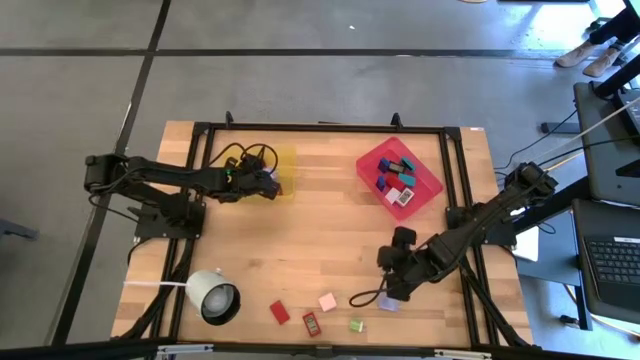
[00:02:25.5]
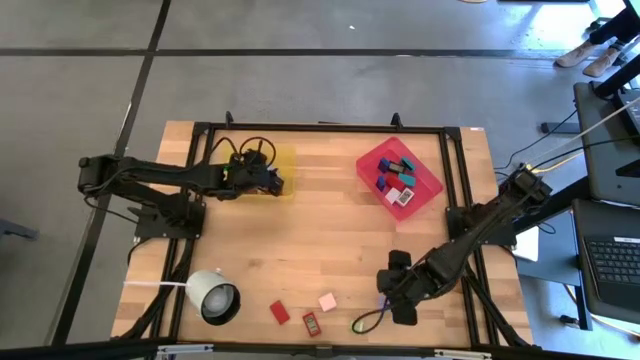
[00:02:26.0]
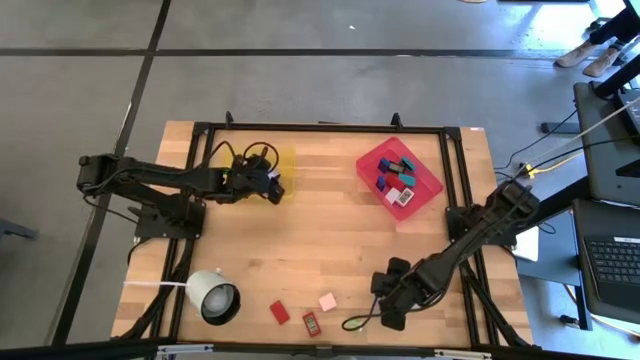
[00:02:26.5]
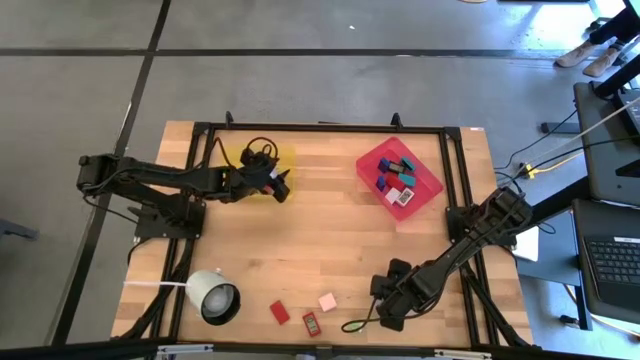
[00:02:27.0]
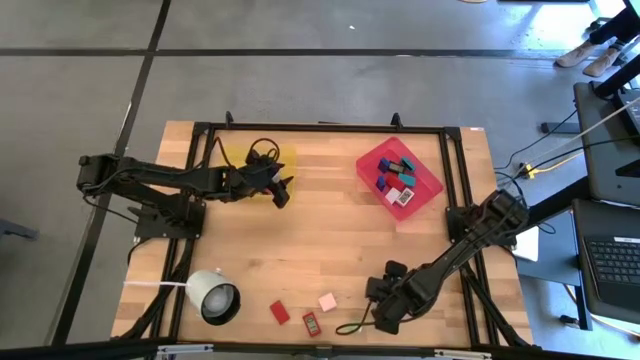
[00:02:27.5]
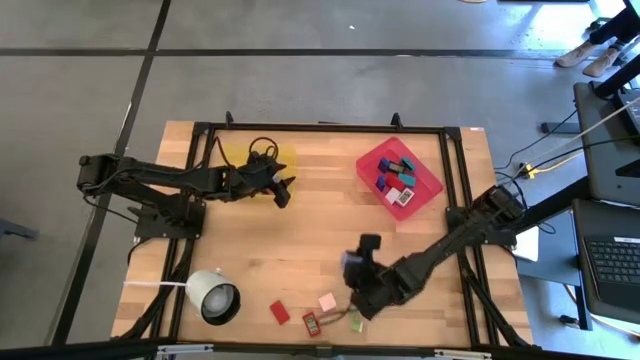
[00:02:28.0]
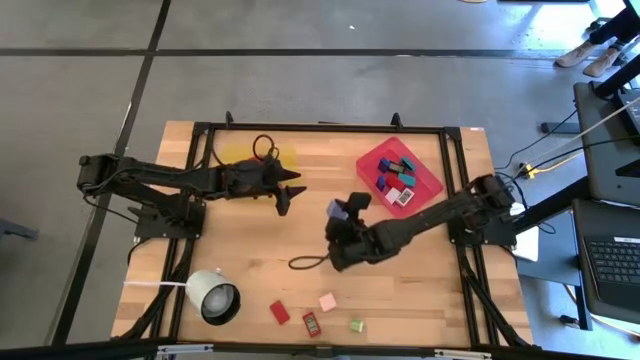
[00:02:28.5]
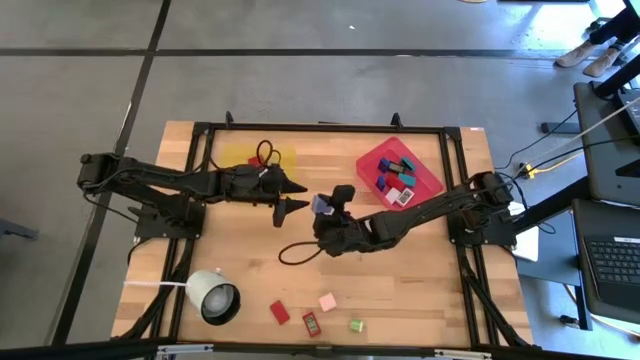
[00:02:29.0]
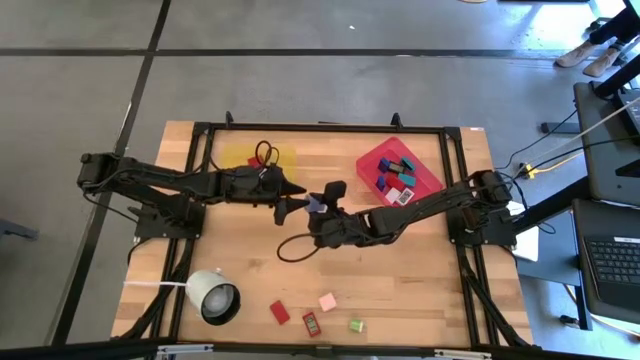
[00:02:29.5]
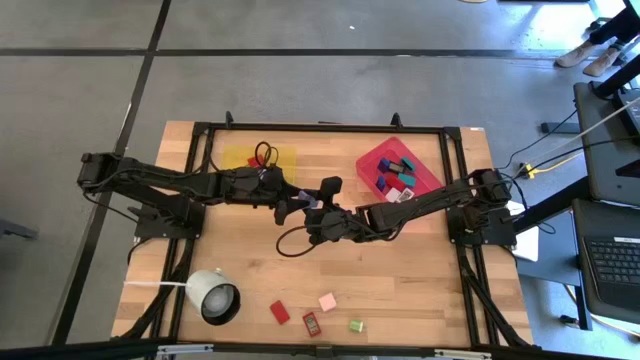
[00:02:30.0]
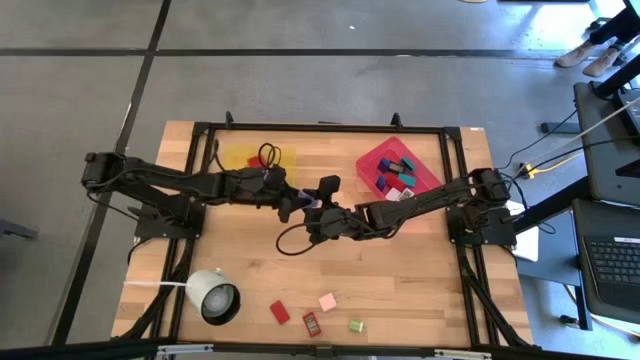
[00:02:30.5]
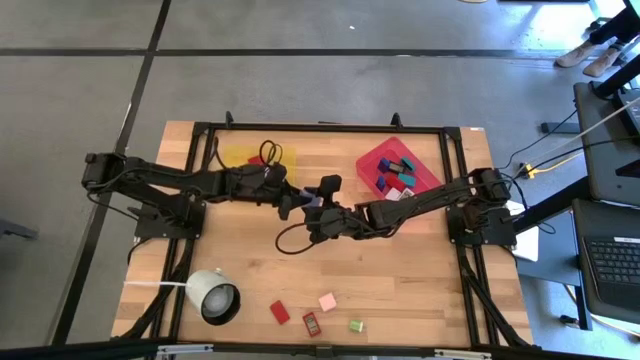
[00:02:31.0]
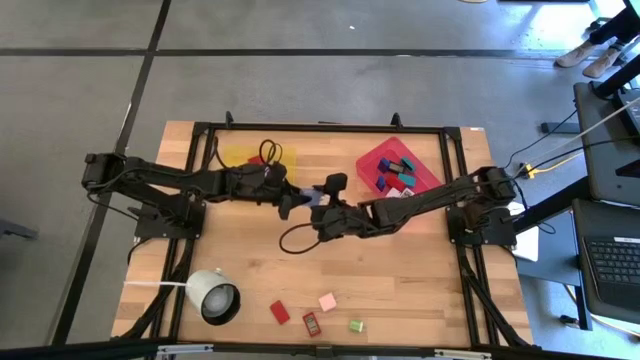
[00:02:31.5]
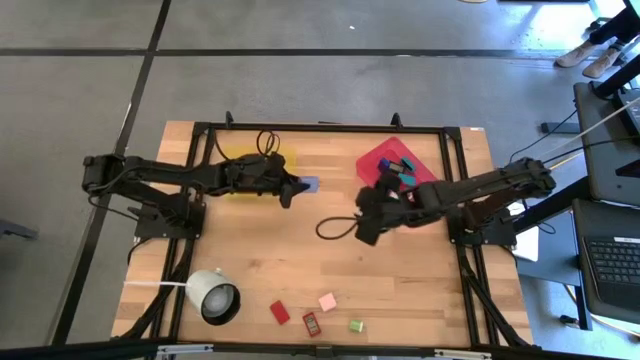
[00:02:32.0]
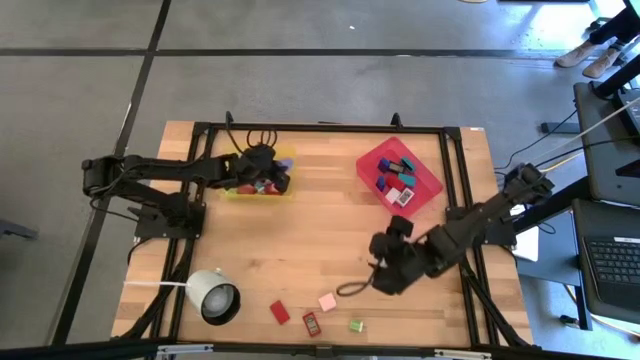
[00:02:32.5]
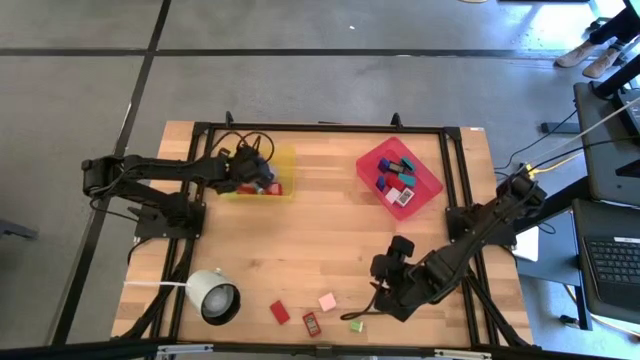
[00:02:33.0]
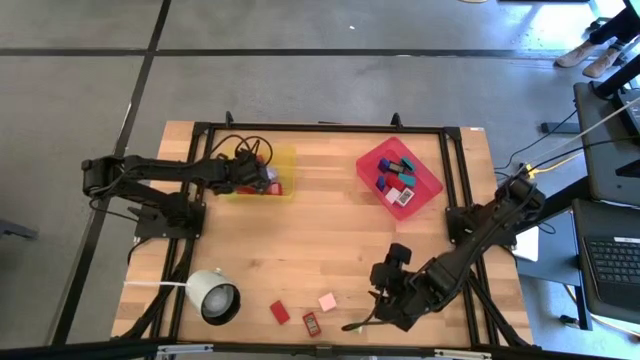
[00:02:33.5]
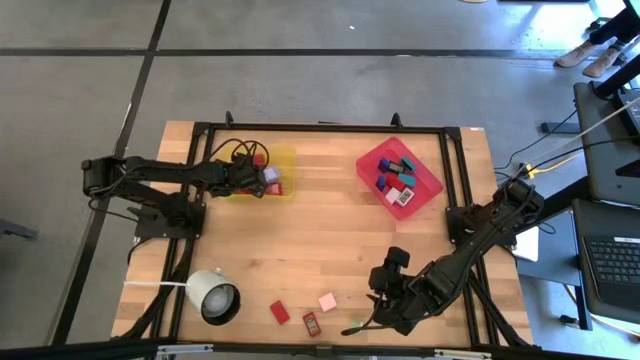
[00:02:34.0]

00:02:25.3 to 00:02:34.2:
Task: Pick & Place Office items
Put the light purple charger adapter into the yellow bin

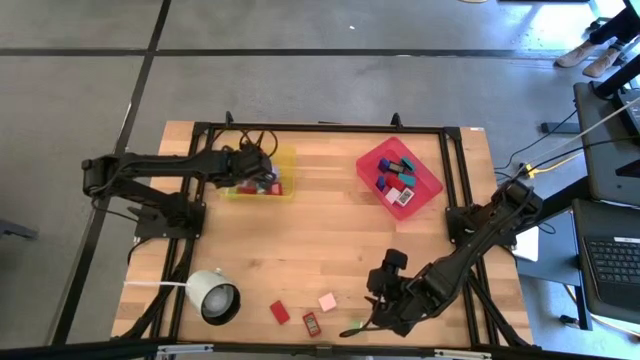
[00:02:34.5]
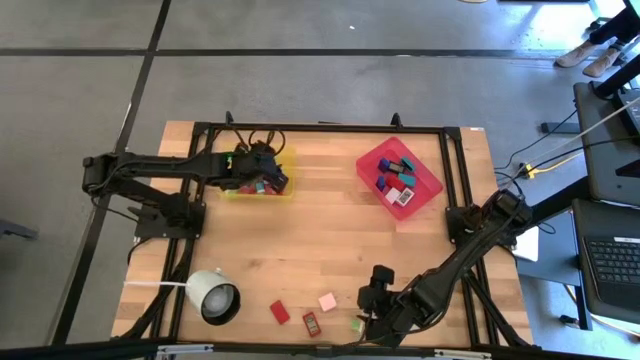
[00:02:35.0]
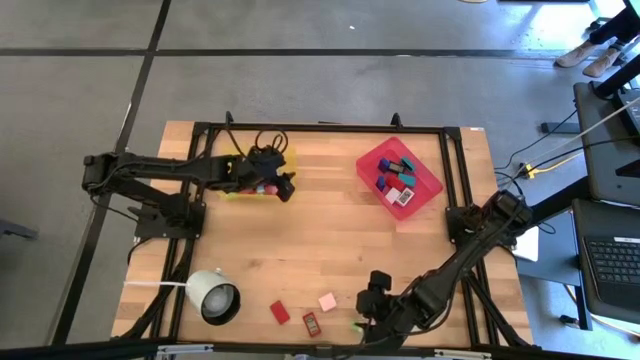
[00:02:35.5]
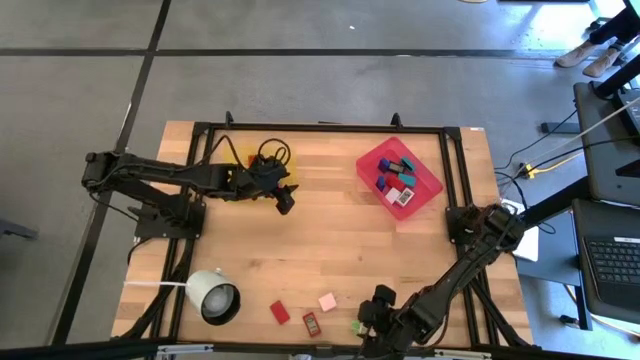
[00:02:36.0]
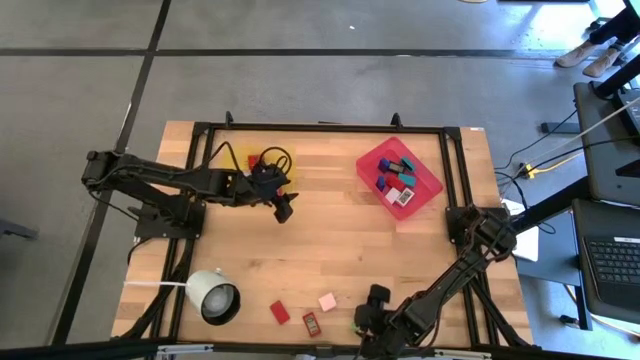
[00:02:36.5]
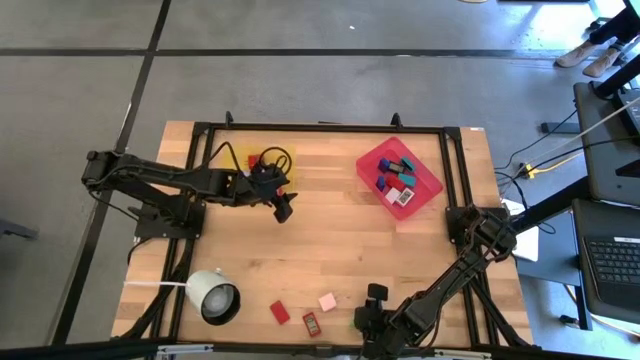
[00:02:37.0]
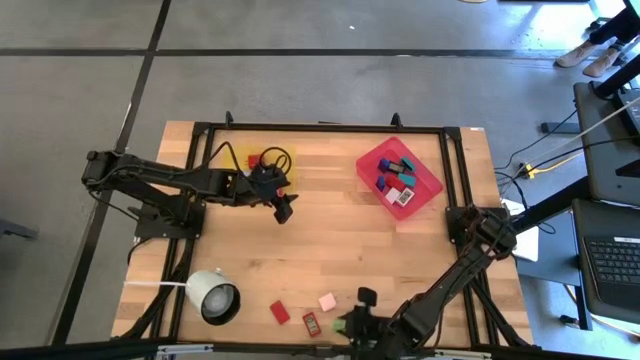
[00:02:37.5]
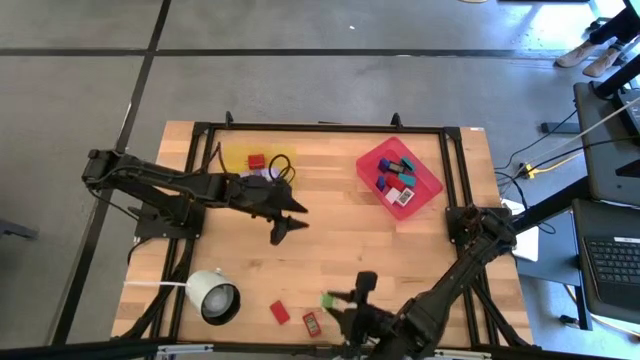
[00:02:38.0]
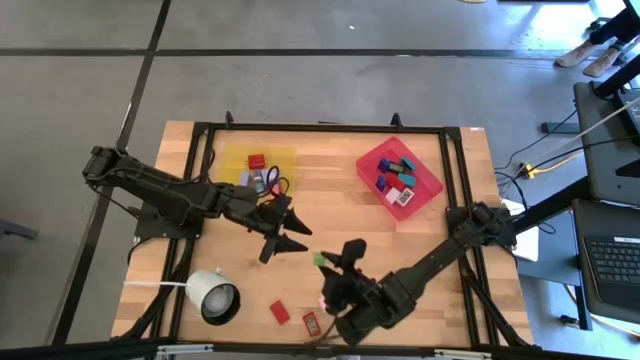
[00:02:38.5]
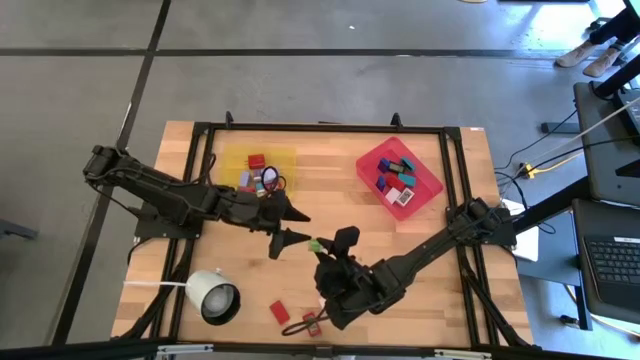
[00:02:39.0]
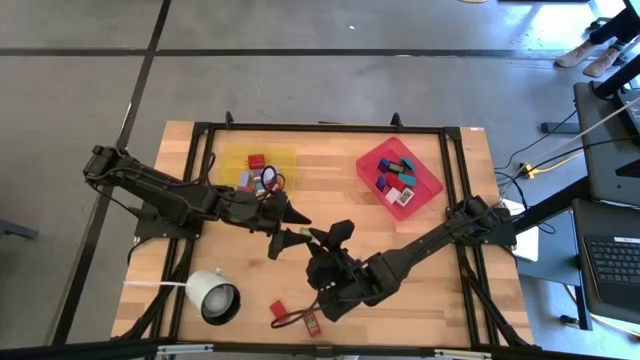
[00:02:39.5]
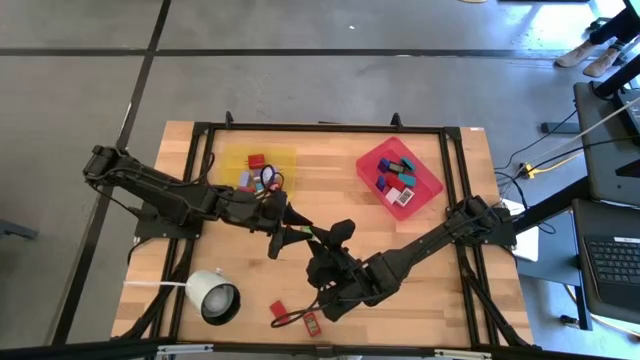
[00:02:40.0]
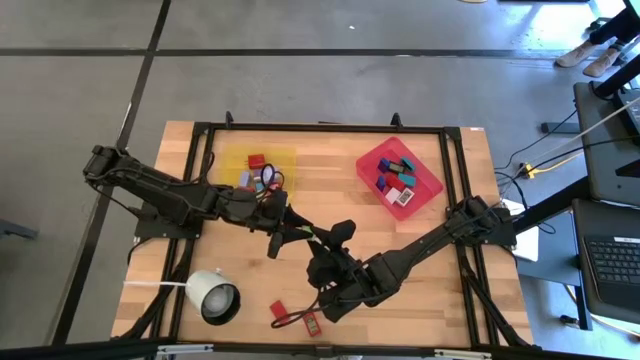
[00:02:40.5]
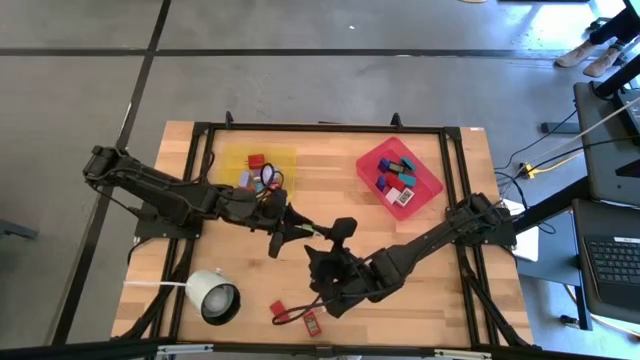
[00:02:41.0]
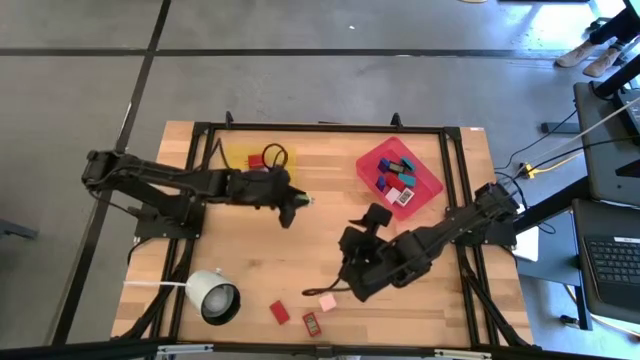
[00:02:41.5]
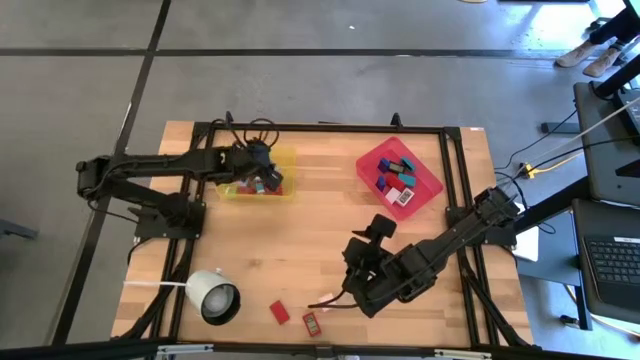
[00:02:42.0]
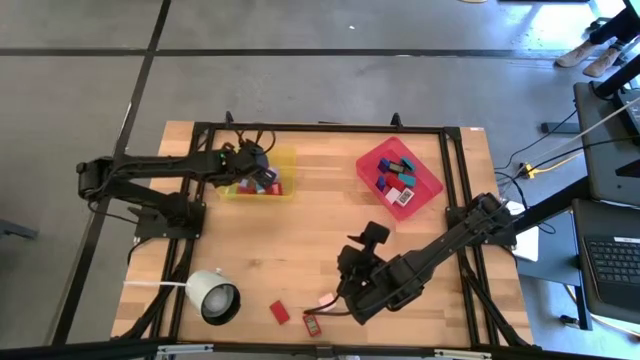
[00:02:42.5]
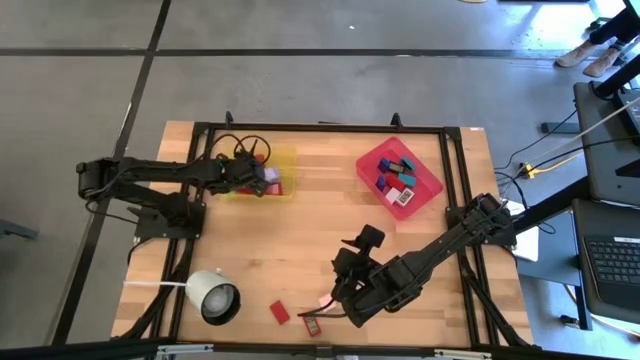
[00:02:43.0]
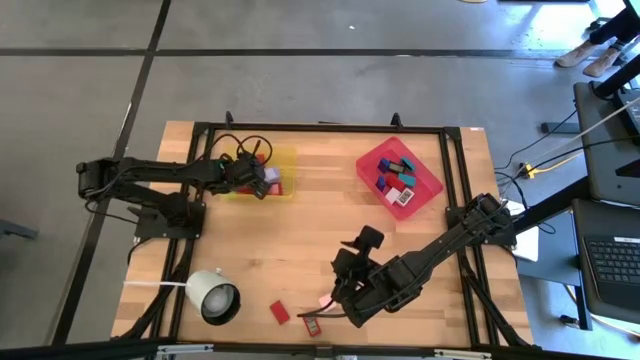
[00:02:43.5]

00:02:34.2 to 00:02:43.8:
Put the green charger adapter into the yellow bin

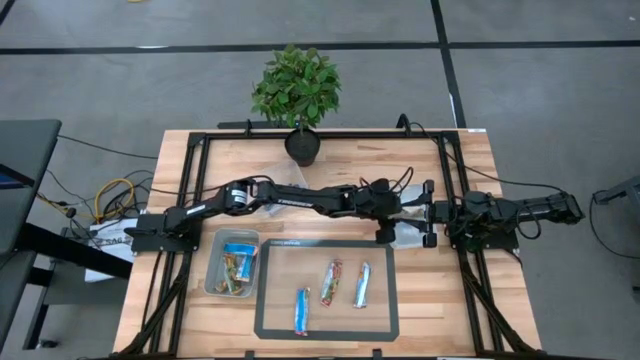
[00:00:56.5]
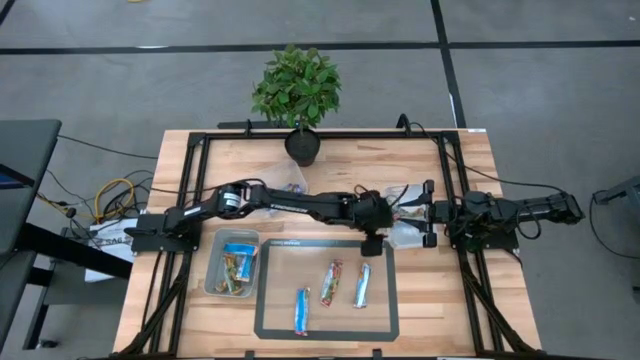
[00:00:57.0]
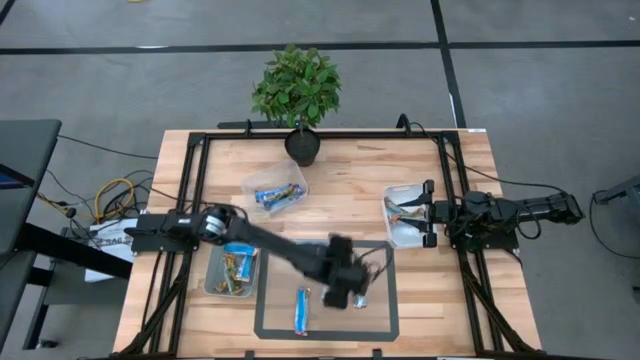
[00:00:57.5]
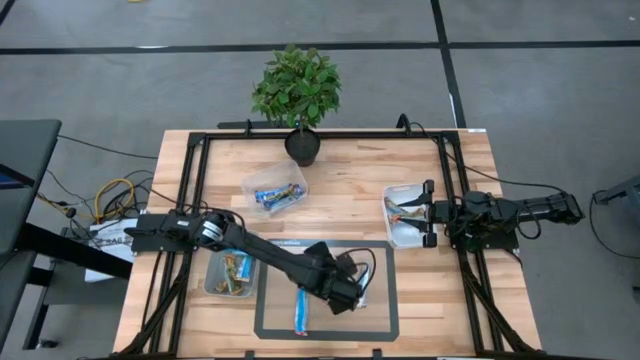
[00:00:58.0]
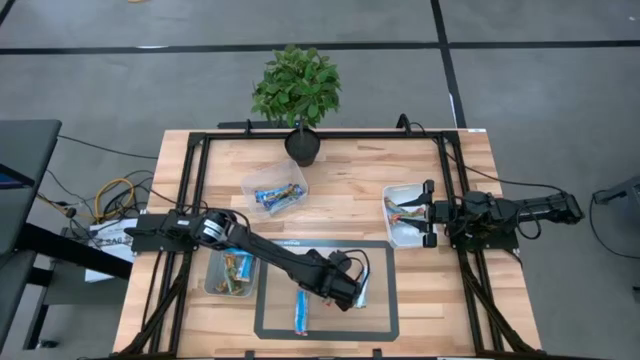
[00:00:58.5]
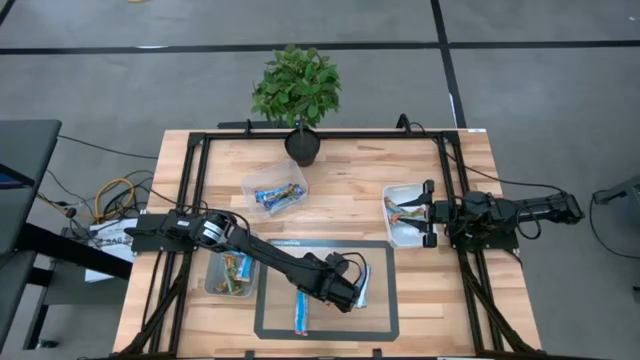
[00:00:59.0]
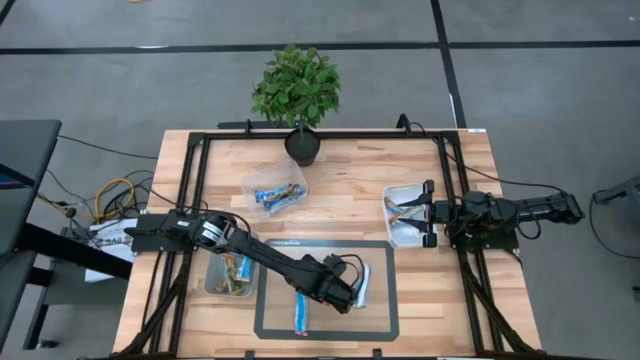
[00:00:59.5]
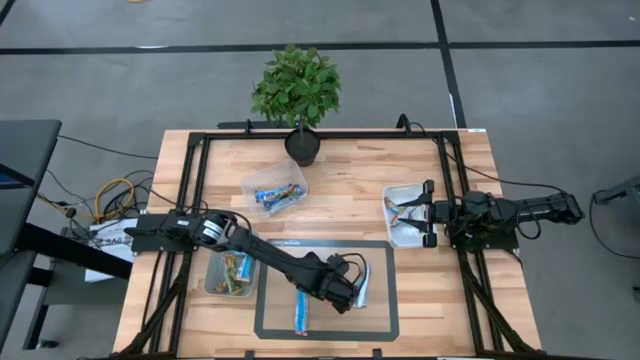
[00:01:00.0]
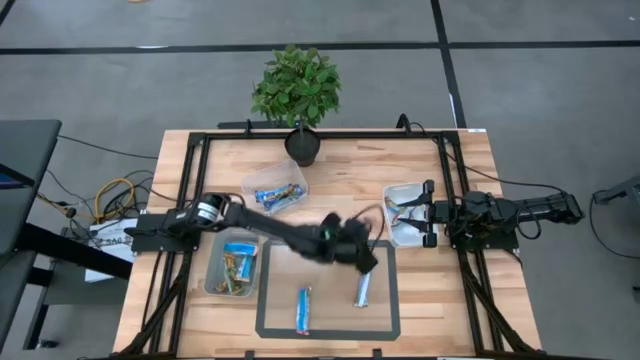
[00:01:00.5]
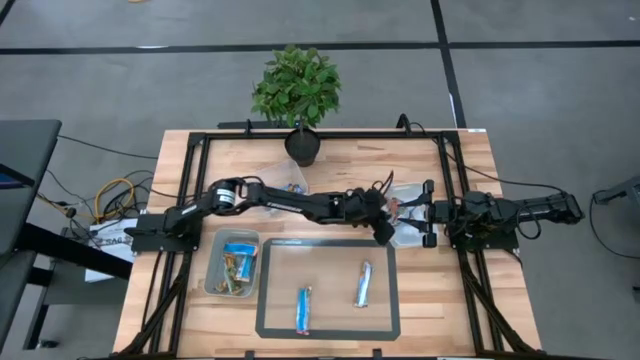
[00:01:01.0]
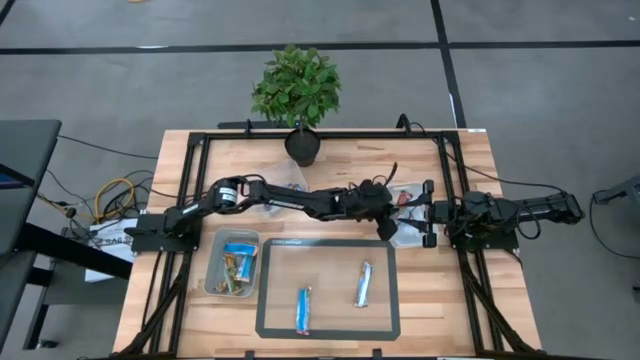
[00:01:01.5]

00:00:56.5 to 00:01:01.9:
Task: Pick and place Granola Bars by type
Put the red granola bar into the white bin
